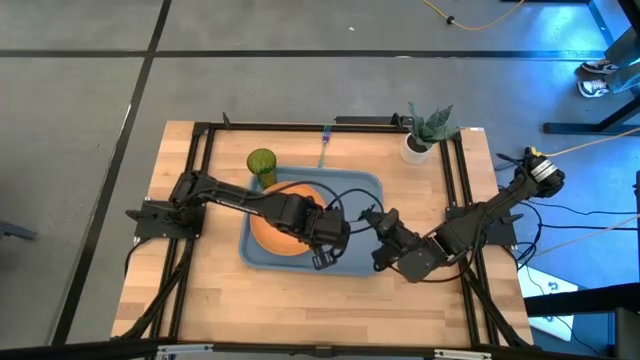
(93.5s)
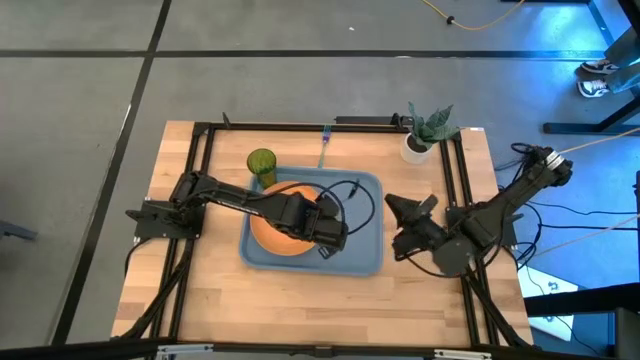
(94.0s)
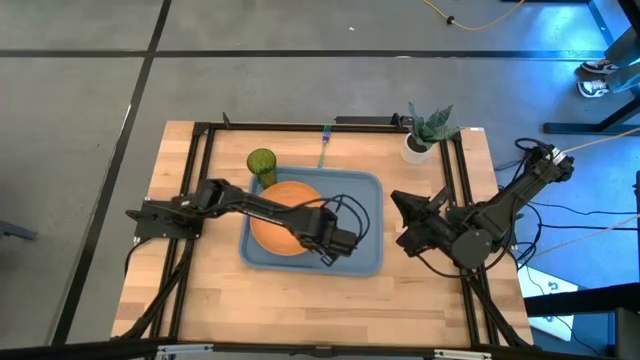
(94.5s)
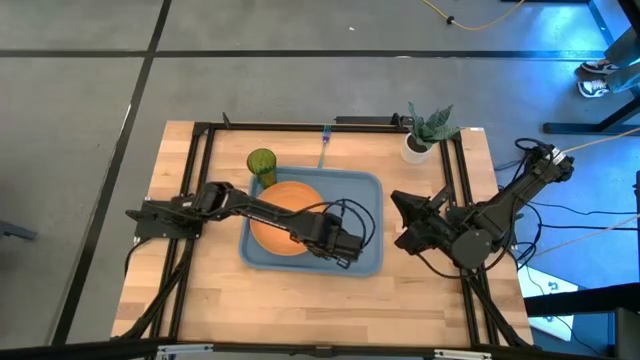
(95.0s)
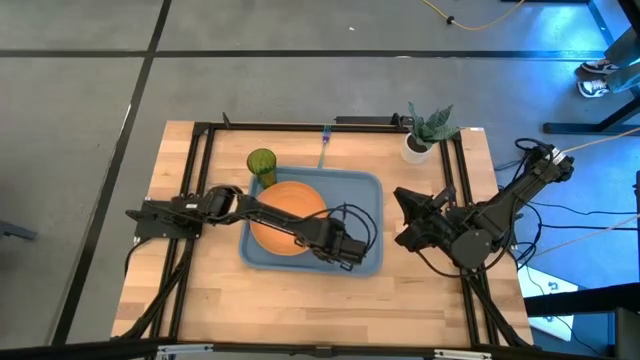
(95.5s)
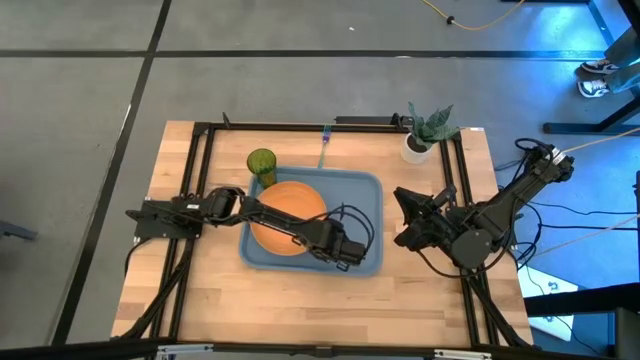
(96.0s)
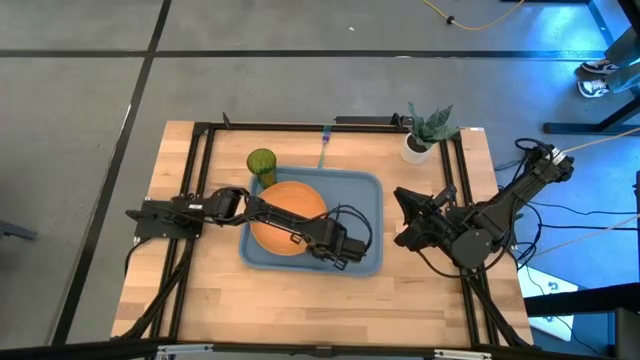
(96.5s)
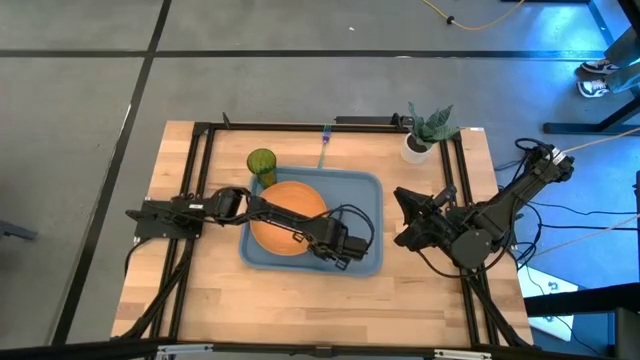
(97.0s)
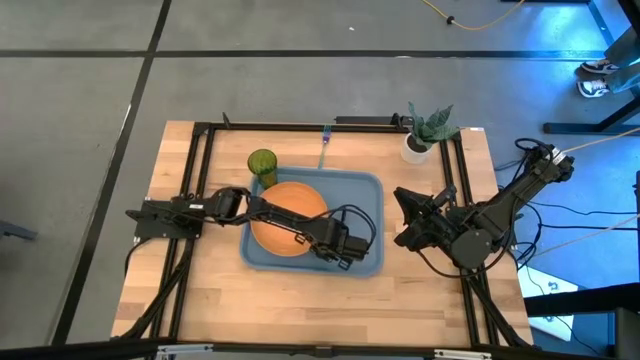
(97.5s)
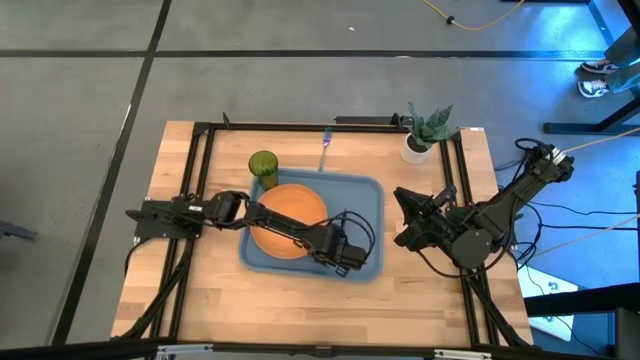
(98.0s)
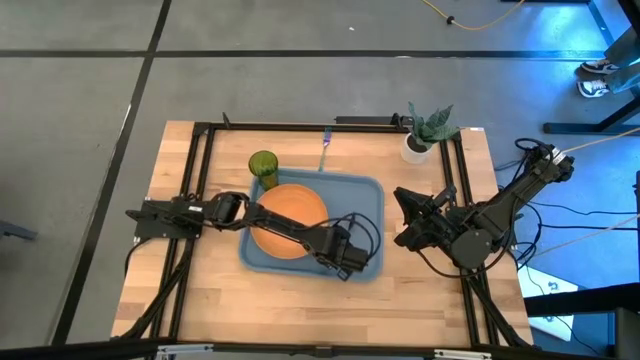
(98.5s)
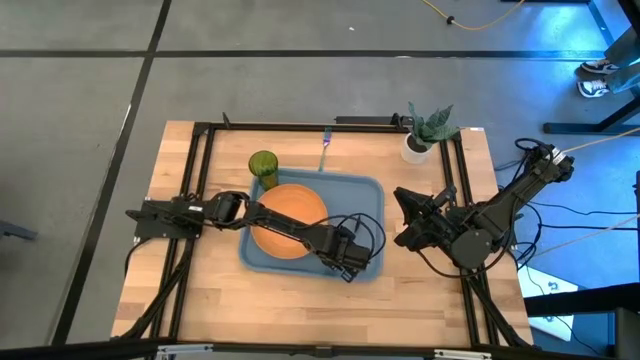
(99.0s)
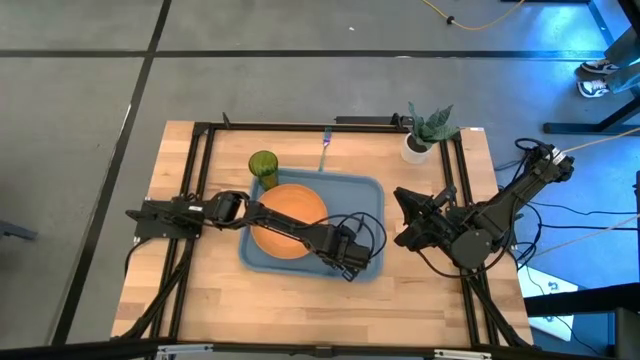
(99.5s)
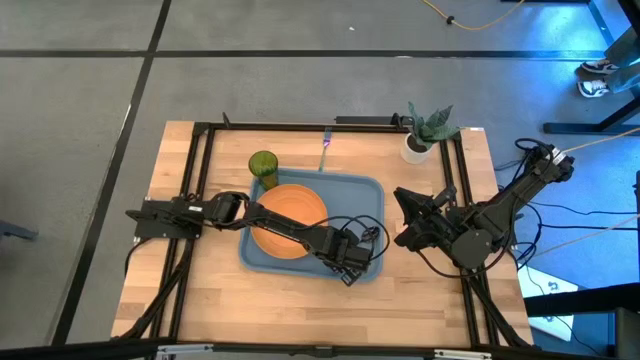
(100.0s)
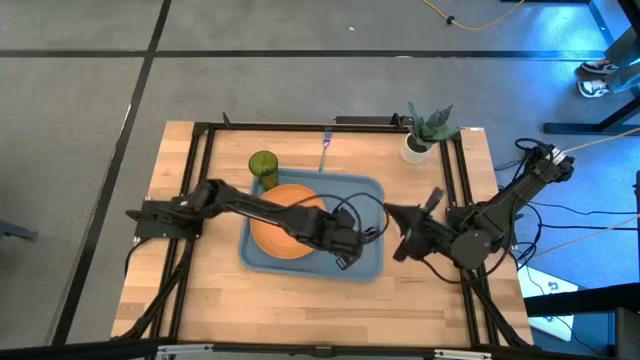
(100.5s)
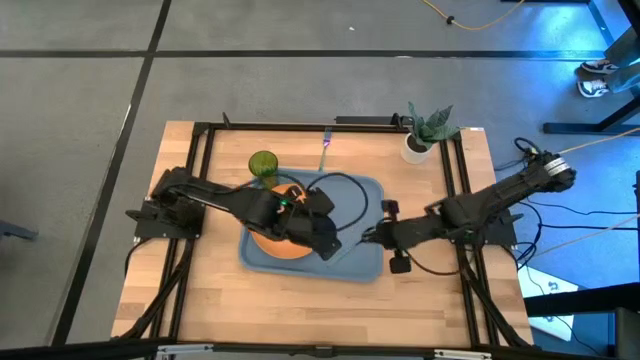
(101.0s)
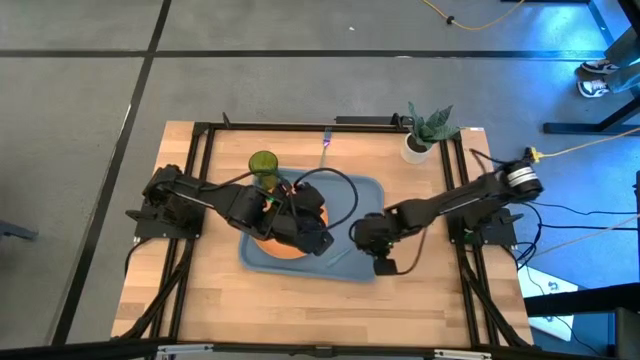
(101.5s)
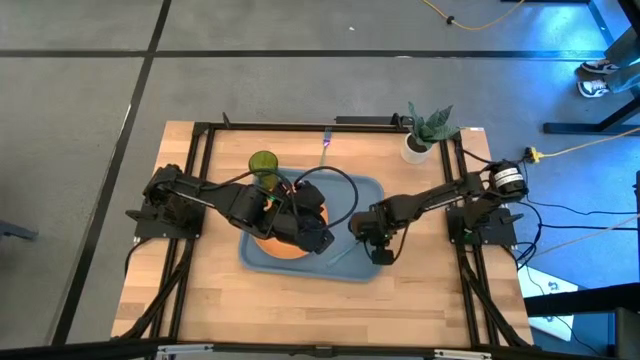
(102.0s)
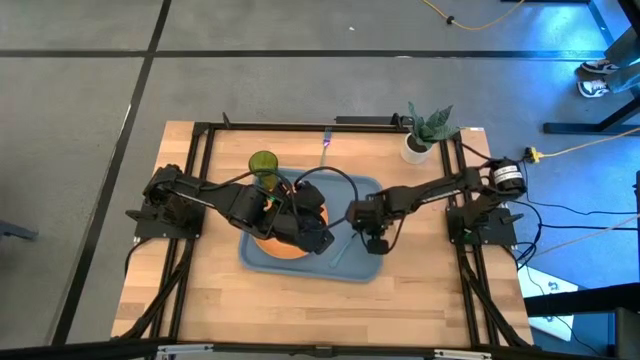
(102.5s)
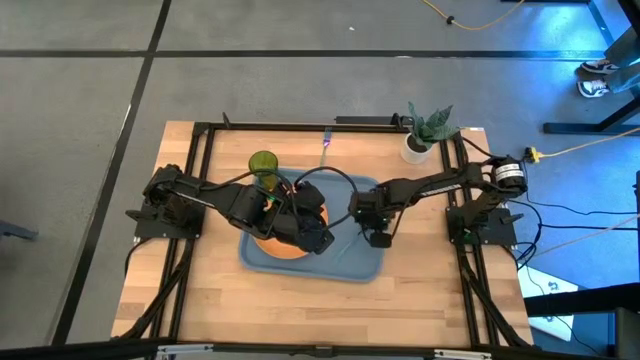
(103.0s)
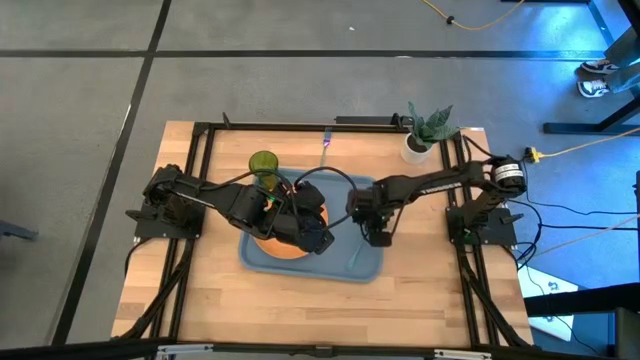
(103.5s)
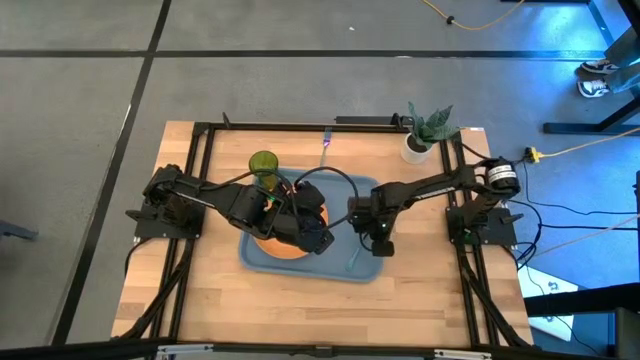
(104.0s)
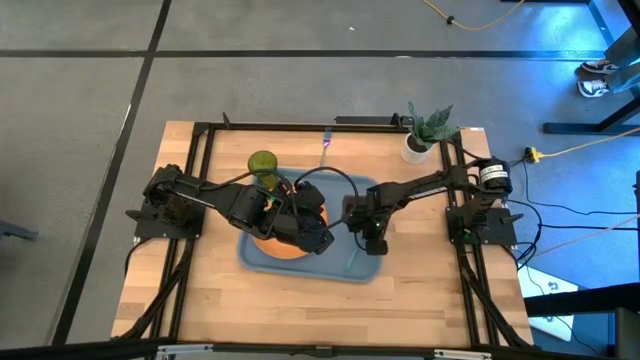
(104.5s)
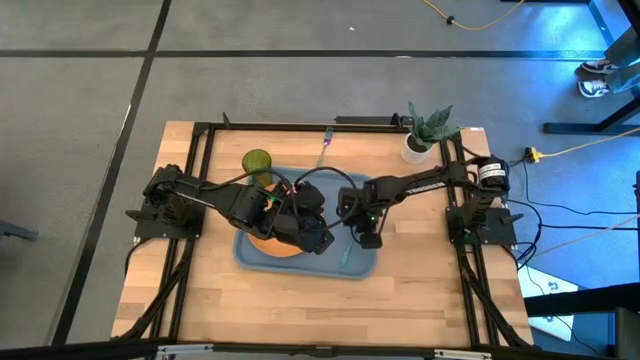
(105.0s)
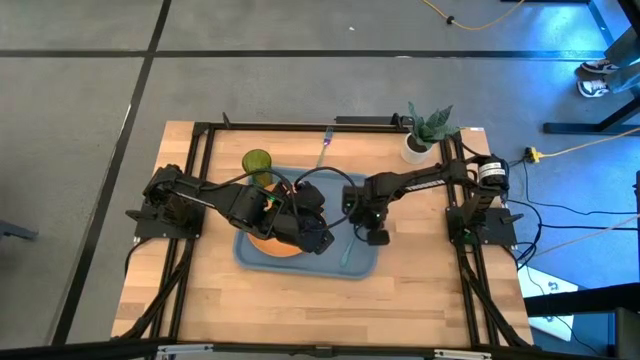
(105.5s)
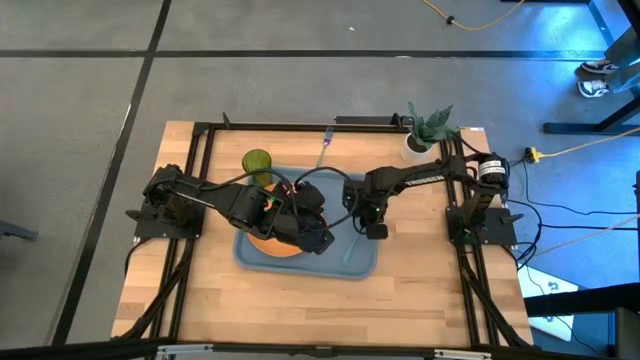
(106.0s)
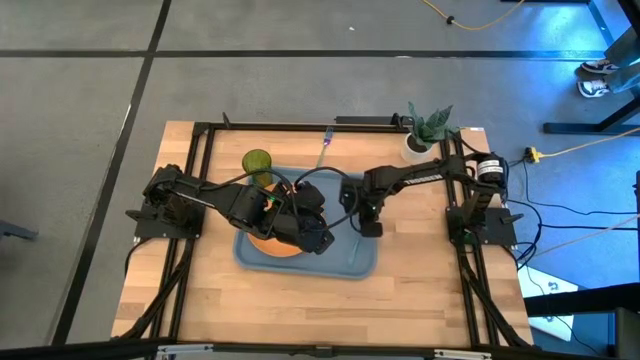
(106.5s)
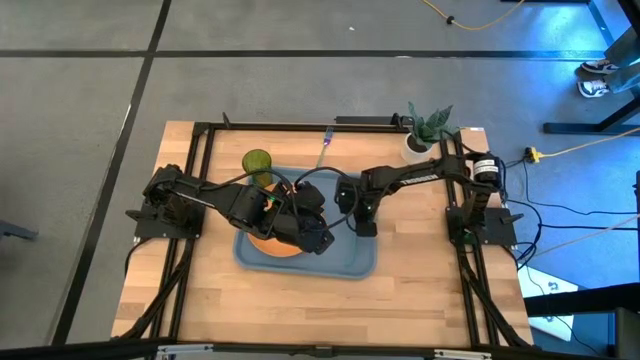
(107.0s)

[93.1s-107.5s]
Task: Pick and place plate/cup/fork/spoon on tray
Put the blue spoon on the blue tray to the right of the orange plate

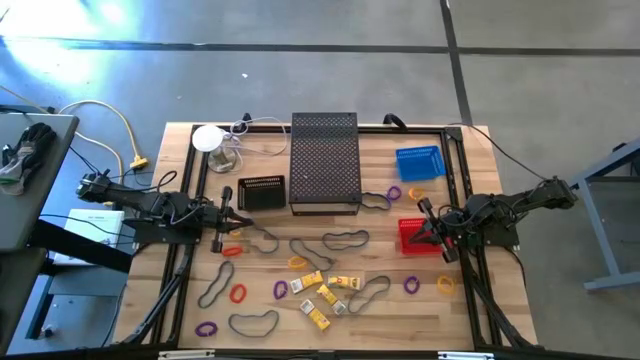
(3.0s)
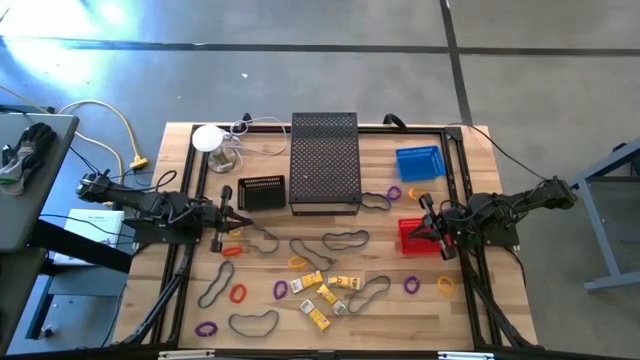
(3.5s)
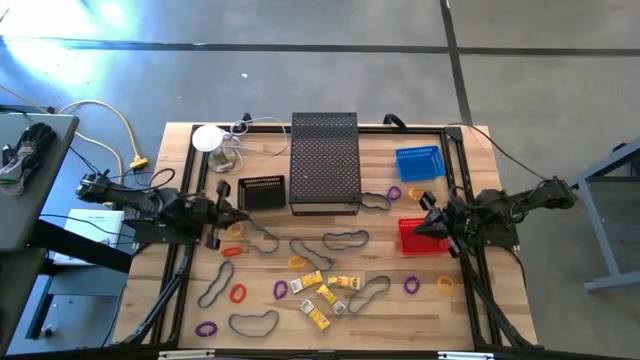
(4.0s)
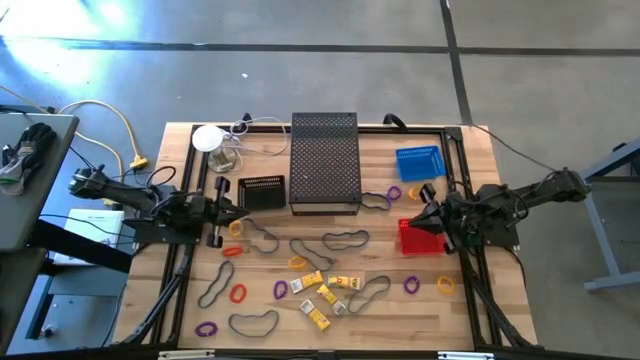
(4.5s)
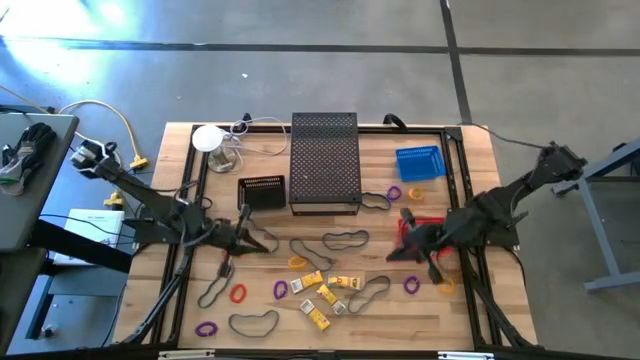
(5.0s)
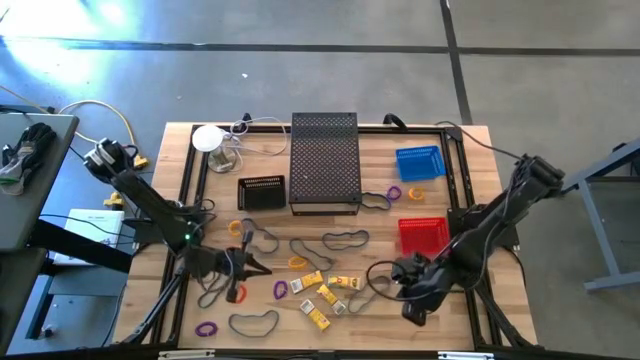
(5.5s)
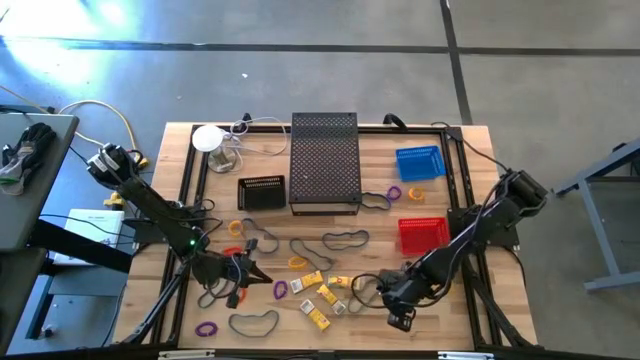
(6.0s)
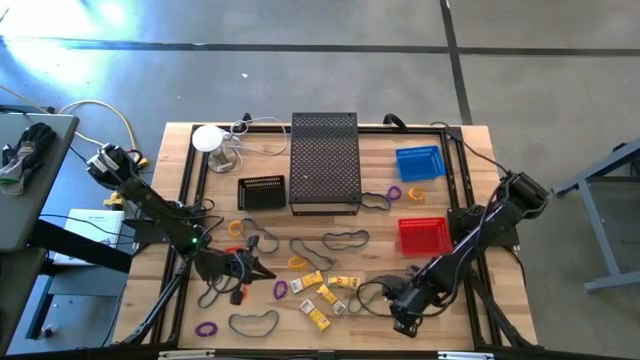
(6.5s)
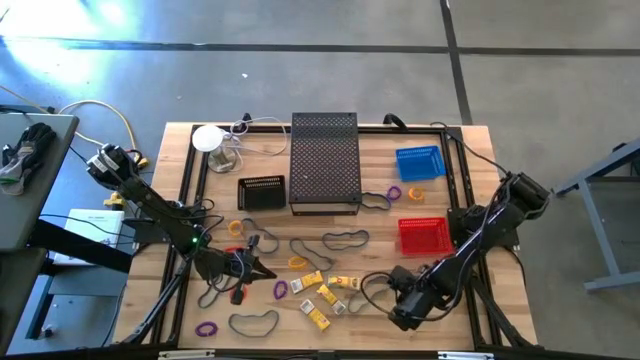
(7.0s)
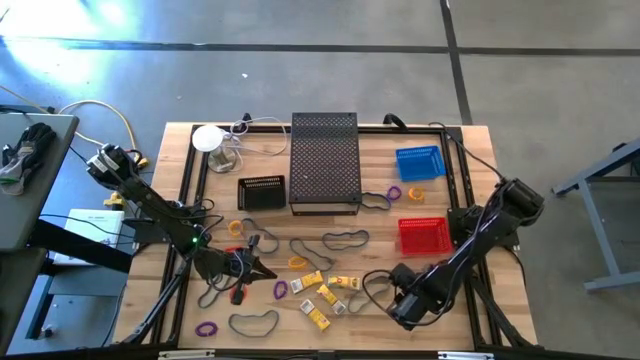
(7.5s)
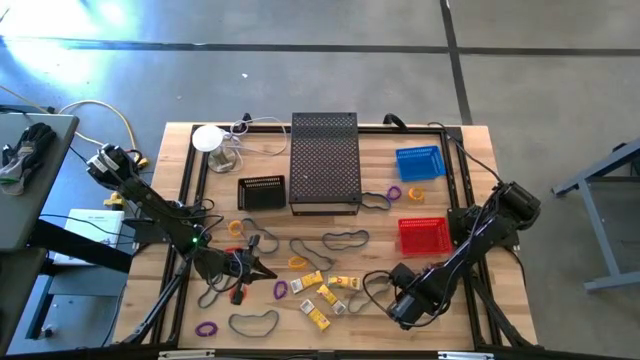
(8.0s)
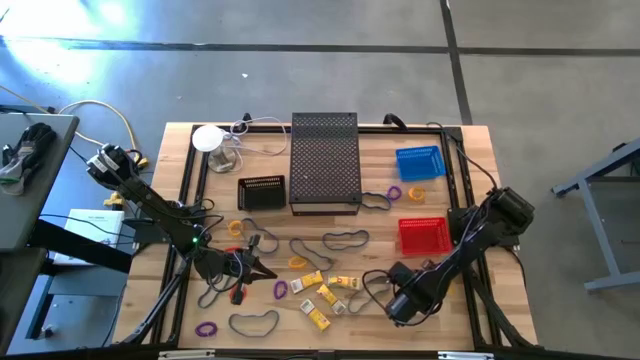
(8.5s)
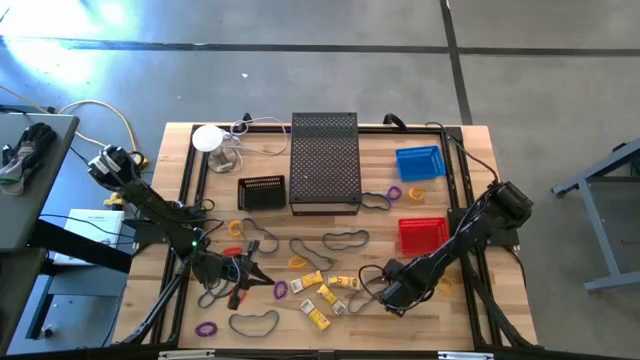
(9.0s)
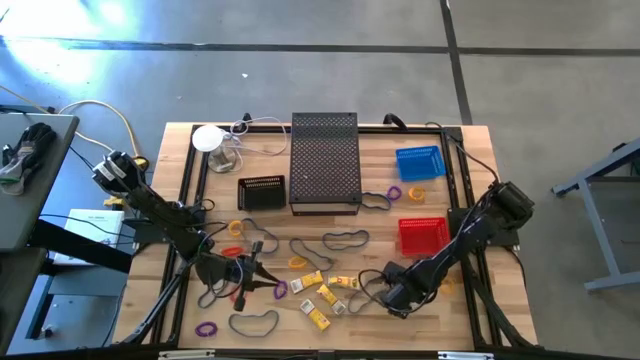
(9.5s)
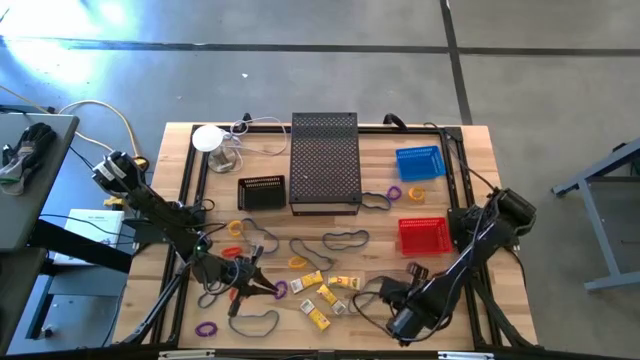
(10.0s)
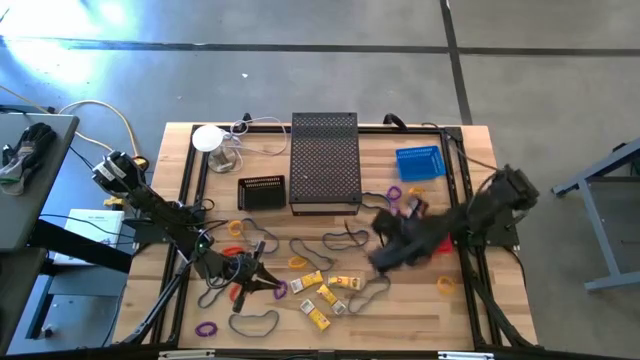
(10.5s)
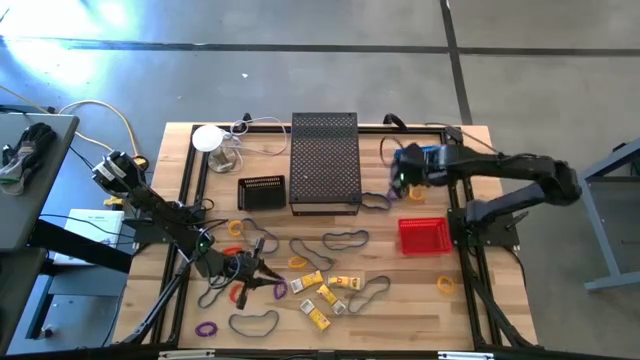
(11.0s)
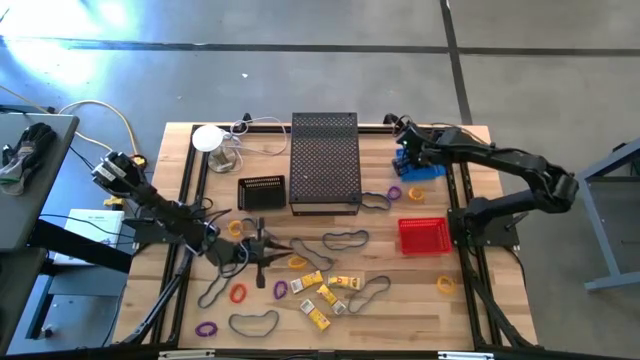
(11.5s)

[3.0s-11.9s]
Task: Pick & Place Office Desk Supplies
Put the violet spring keychain into the blue bin
